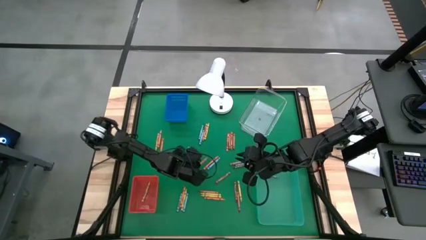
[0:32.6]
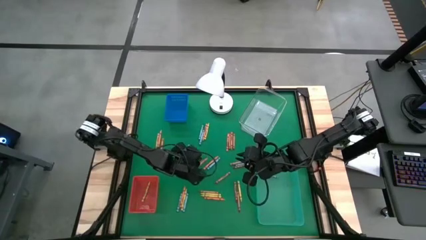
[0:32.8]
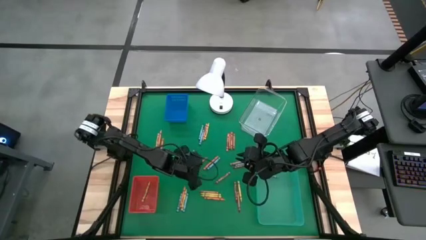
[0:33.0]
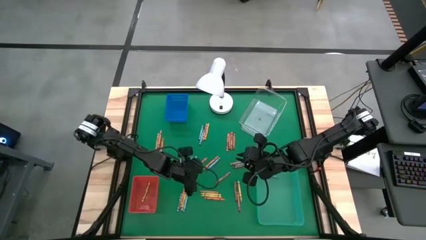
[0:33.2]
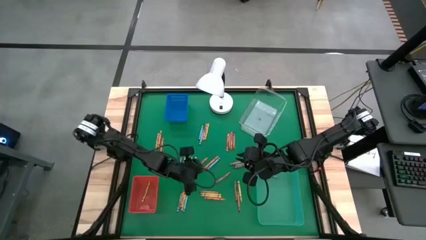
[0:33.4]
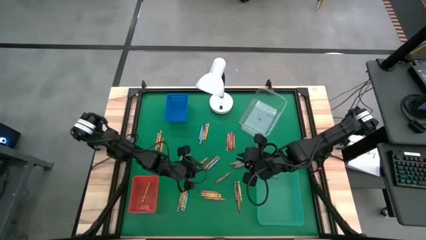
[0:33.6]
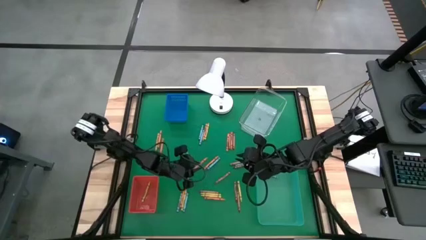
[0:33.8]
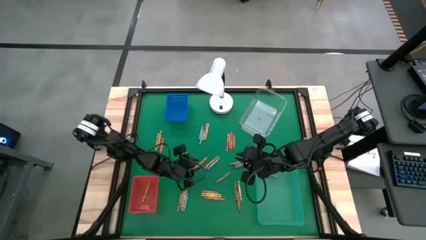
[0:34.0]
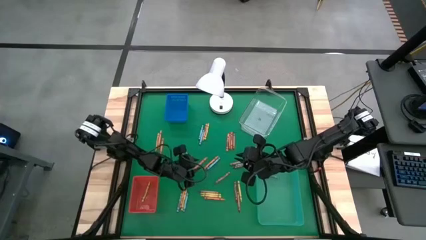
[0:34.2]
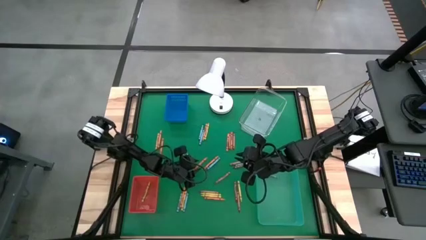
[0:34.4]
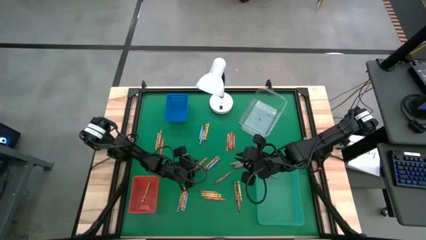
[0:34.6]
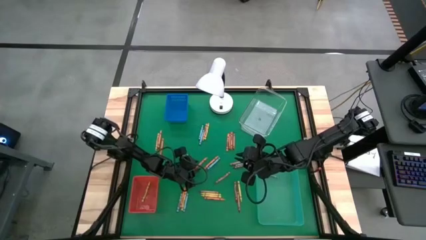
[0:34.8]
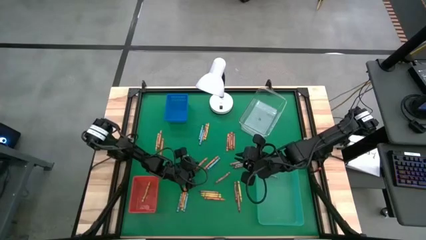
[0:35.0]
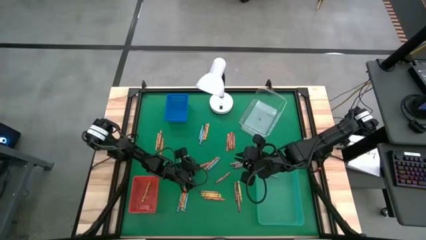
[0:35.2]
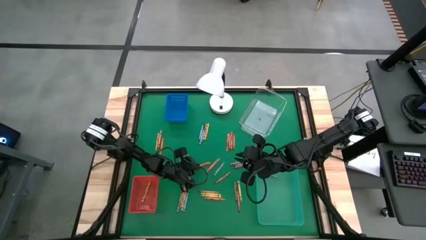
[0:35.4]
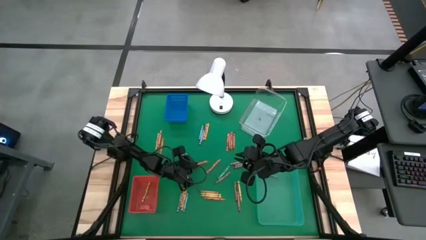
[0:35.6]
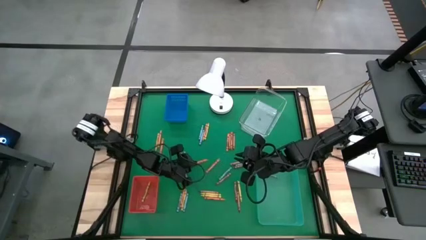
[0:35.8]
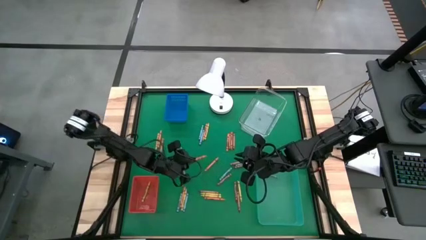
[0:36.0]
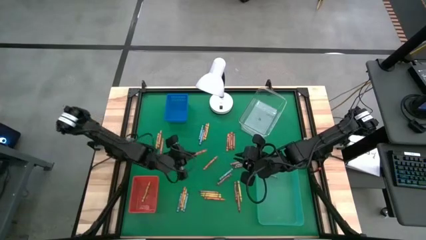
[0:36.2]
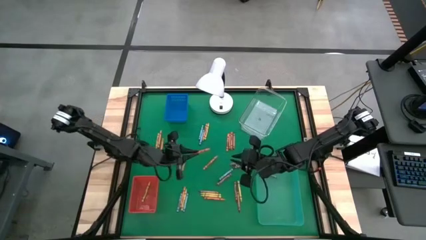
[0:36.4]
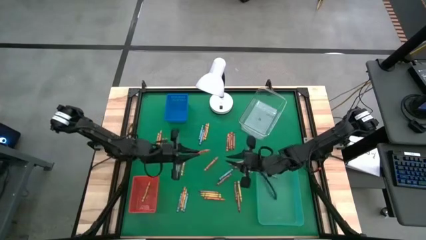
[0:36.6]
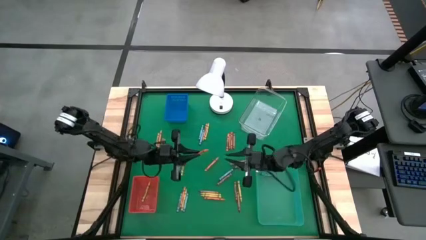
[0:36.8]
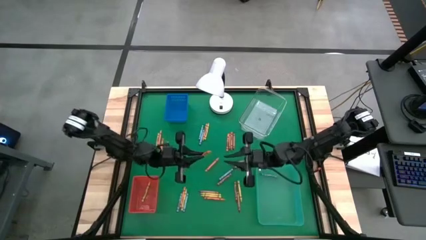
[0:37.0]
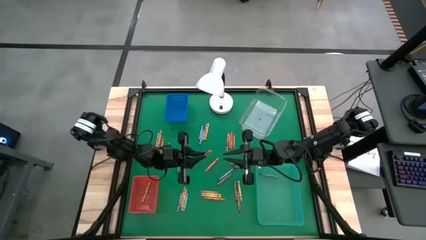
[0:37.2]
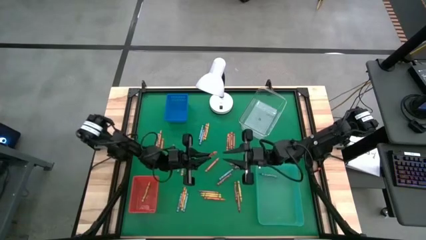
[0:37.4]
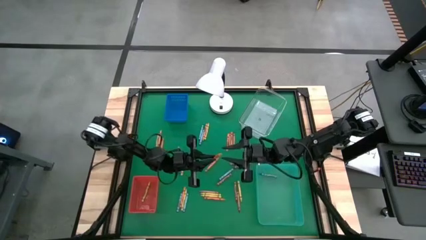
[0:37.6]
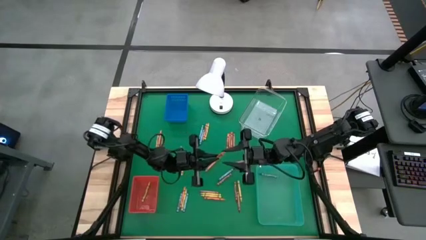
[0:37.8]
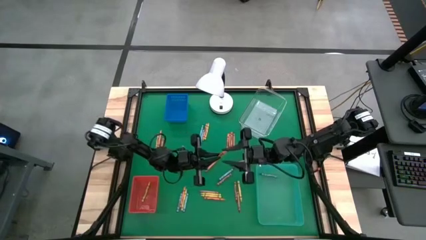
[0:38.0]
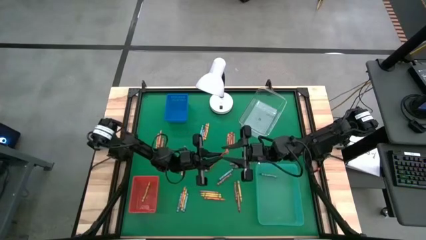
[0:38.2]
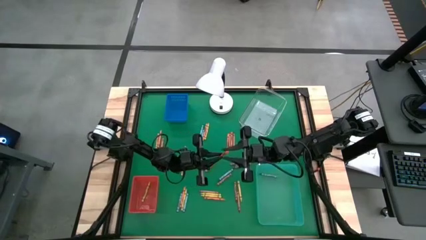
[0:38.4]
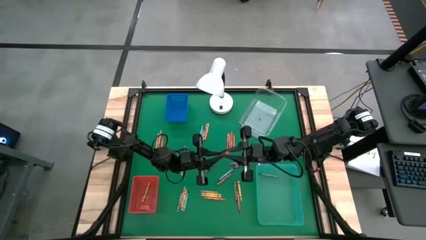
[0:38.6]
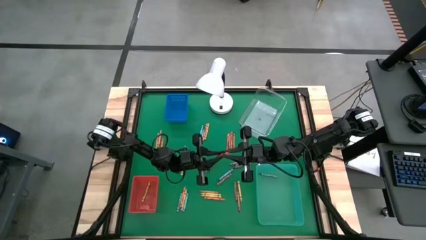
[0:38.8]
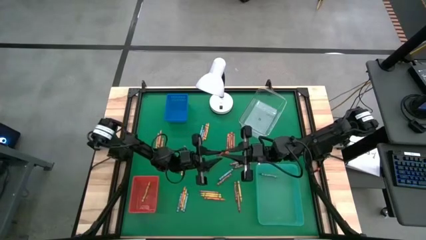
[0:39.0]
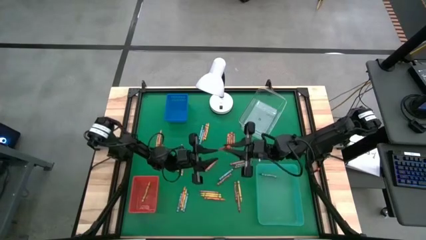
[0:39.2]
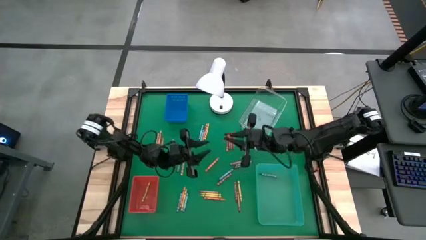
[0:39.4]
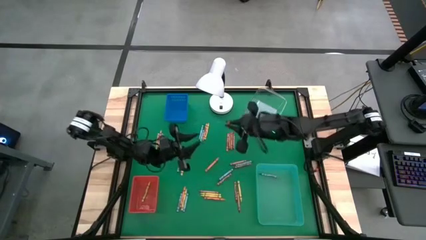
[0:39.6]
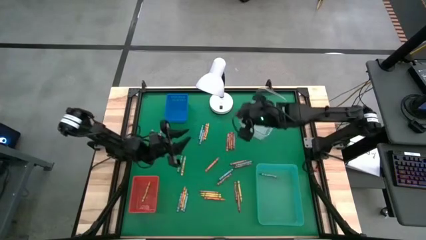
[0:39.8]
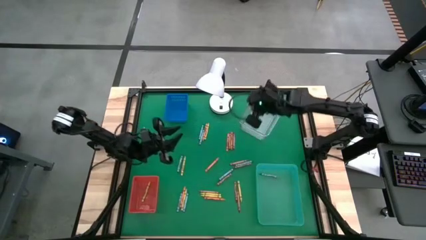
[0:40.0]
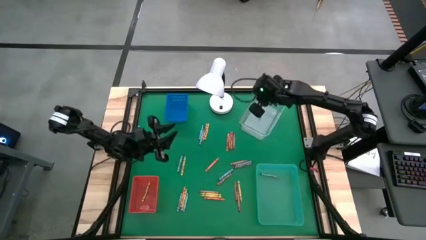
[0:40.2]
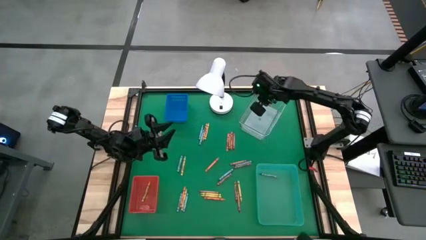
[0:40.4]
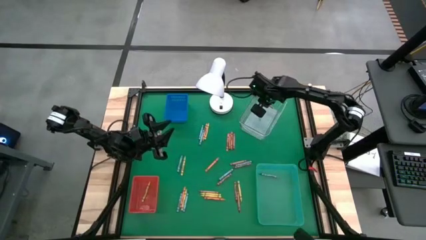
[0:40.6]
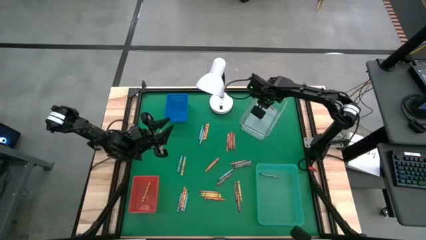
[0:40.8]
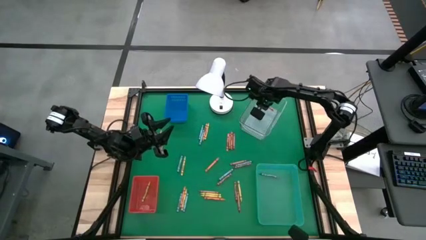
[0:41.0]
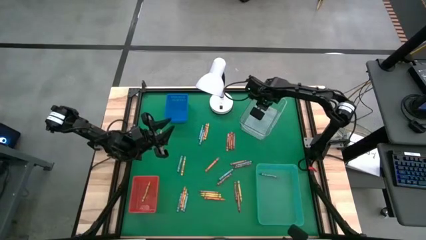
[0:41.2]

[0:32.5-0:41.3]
Task: Sort crayons
Put the orange crayon into the transparent bin

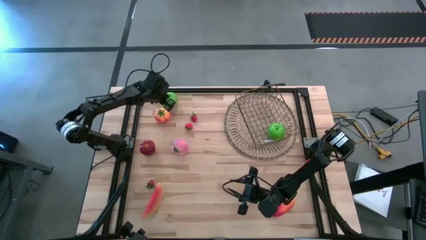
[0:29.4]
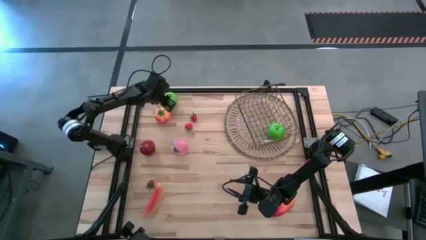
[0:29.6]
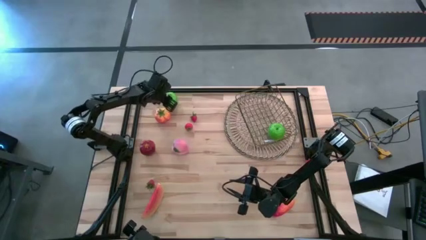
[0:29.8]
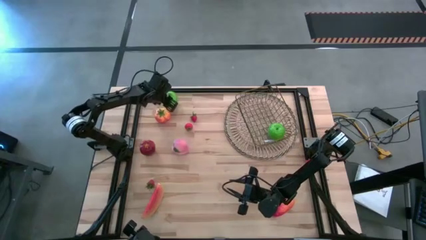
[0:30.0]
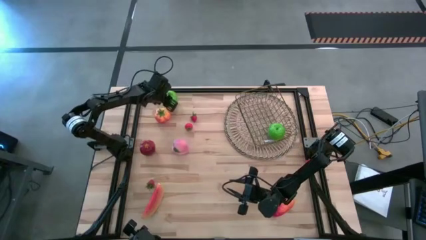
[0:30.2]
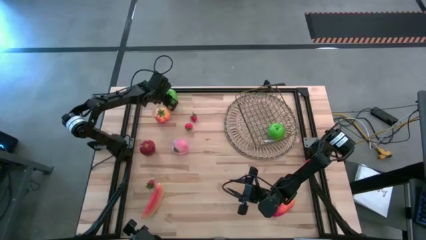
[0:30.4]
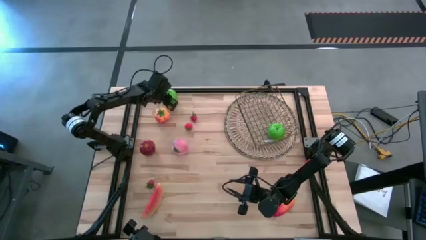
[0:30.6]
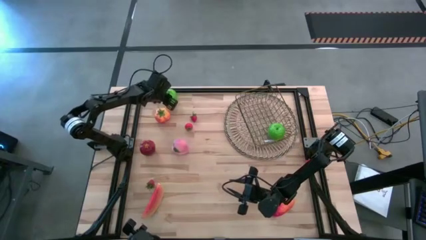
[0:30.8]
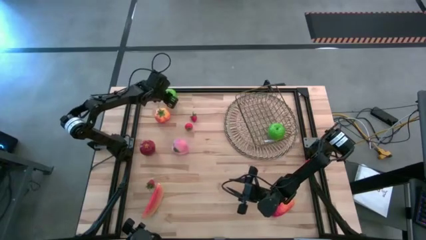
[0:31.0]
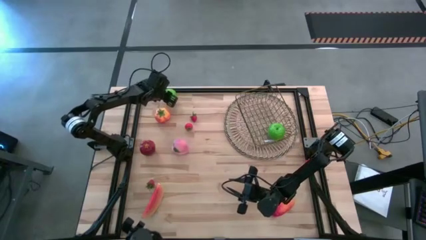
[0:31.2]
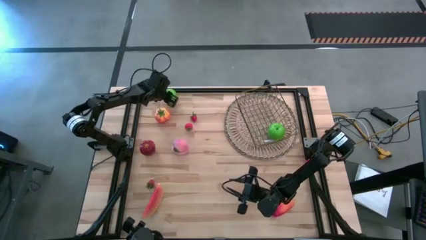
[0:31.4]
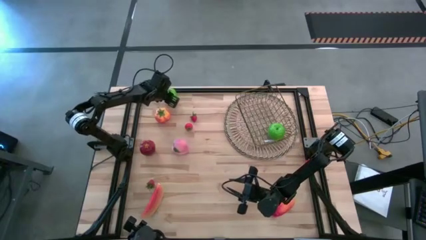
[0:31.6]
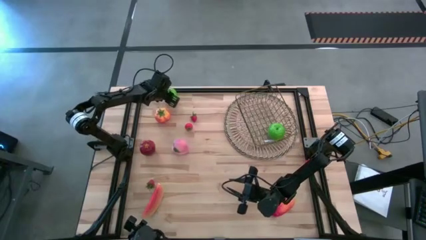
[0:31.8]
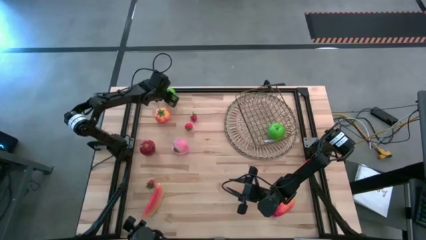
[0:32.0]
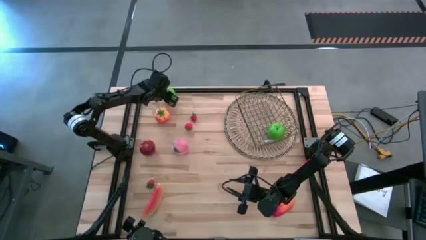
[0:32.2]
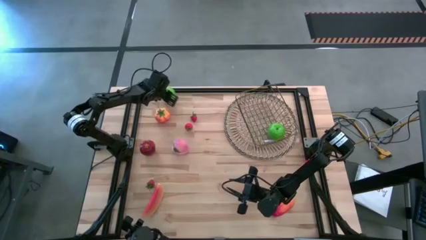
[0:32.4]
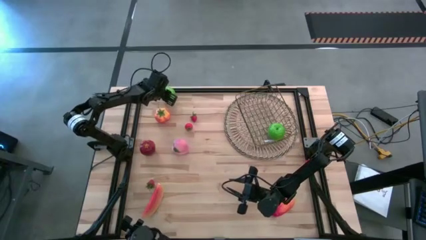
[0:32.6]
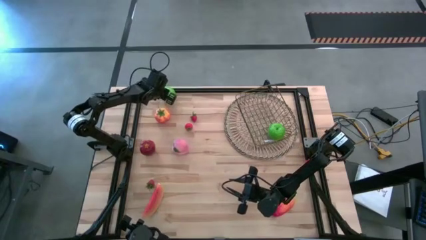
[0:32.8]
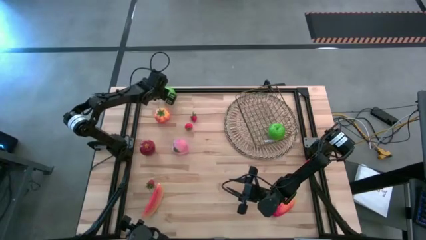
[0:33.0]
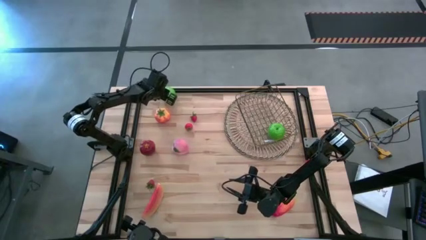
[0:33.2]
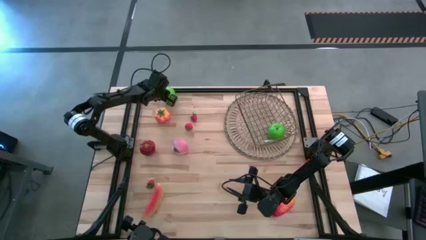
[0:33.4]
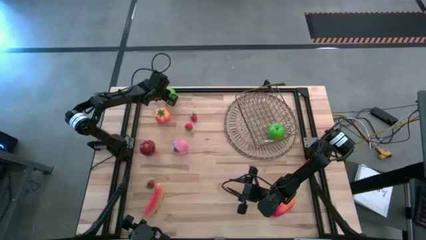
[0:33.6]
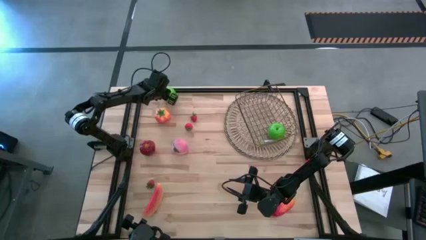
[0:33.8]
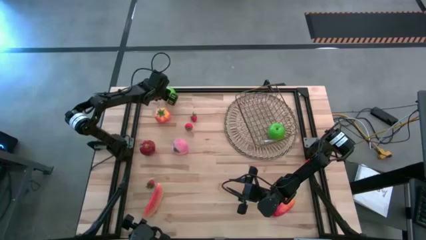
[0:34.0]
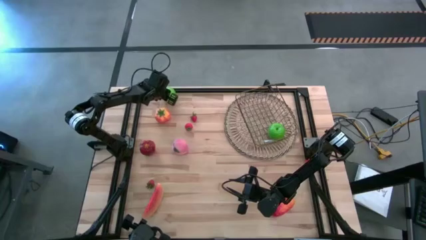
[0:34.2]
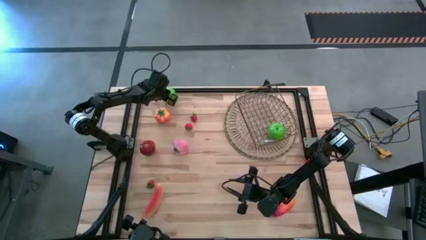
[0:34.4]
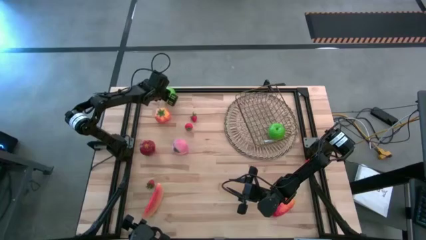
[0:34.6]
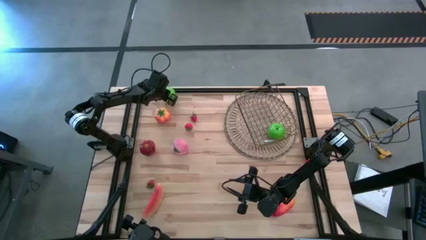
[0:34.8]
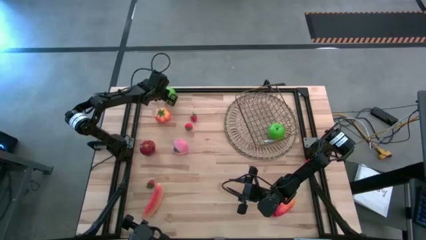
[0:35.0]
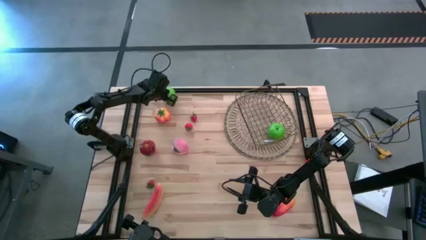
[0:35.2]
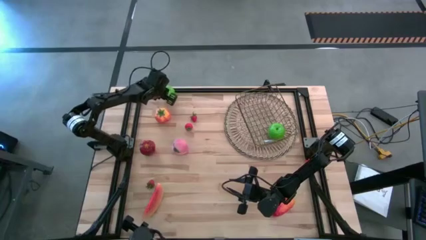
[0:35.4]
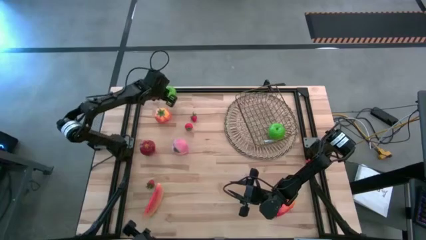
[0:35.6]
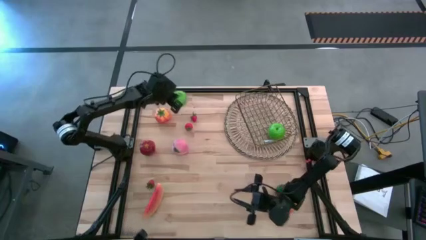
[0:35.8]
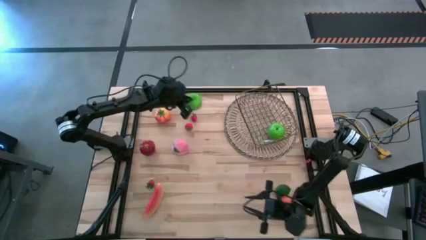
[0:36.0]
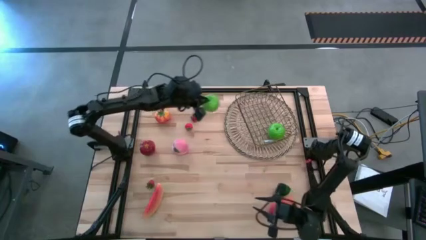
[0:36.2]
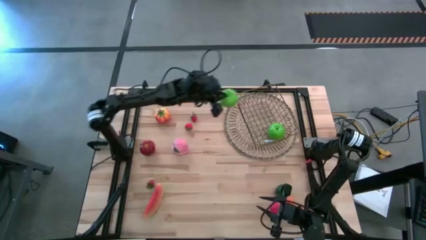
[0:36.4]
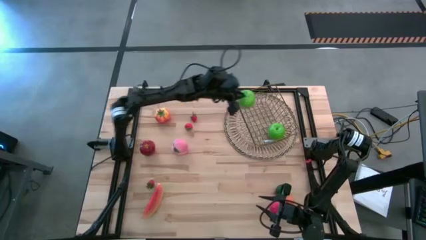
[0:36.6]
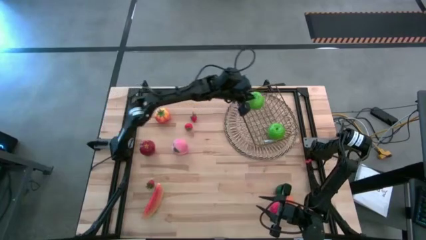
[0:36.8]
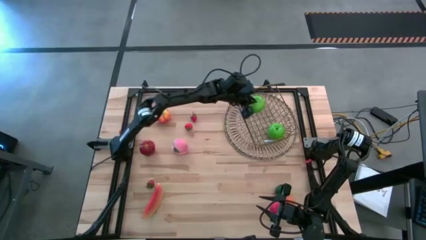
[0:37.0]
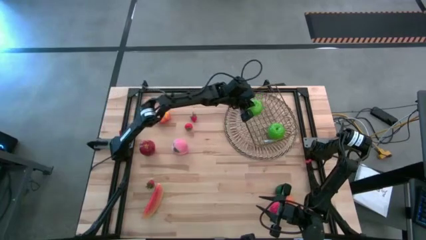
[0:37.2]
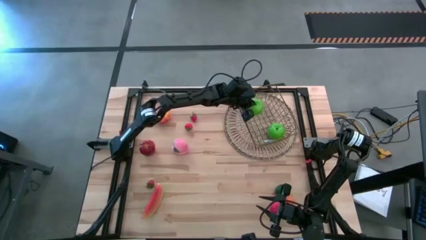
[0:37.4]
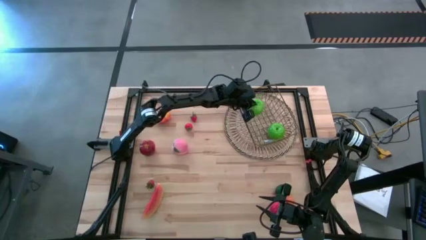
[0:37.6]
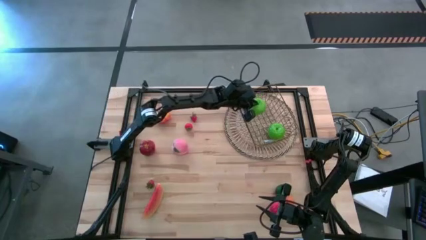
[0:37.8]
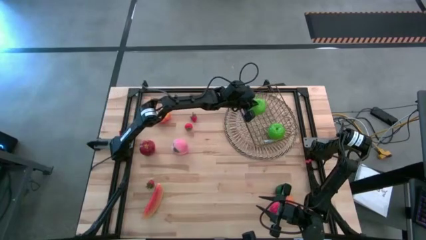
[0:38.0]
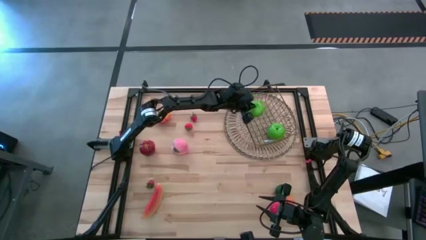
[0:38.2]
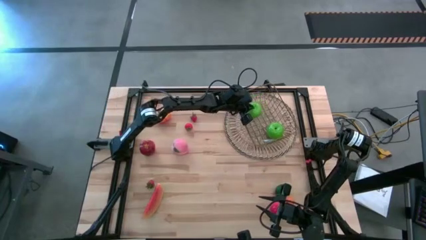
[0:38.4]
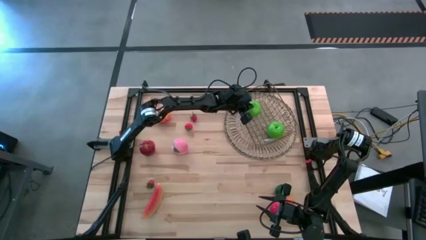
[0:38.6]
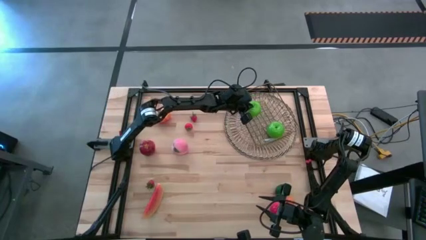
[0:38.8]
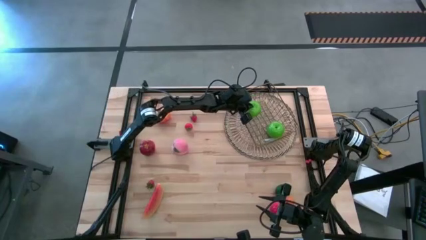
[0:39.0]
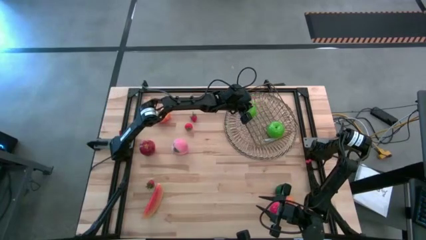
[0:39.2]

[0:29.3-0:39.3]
Task: Build produce basket
Put the green apple into the gold wire basket
